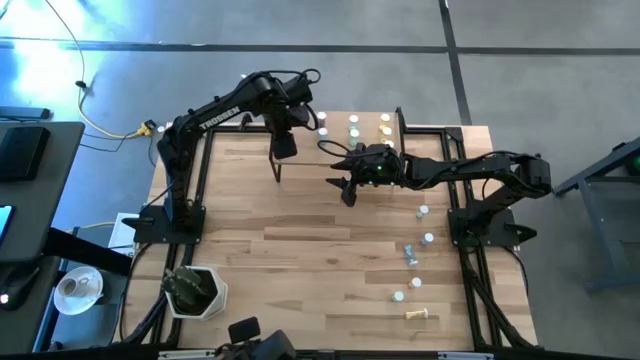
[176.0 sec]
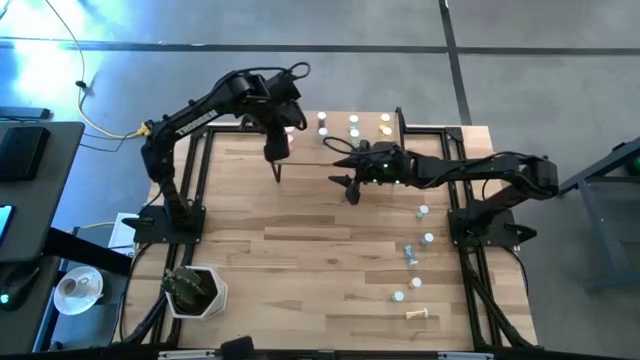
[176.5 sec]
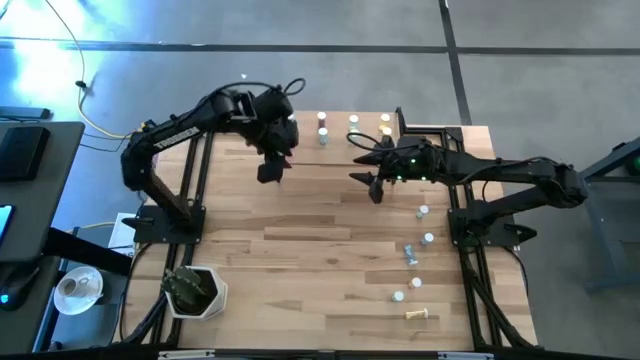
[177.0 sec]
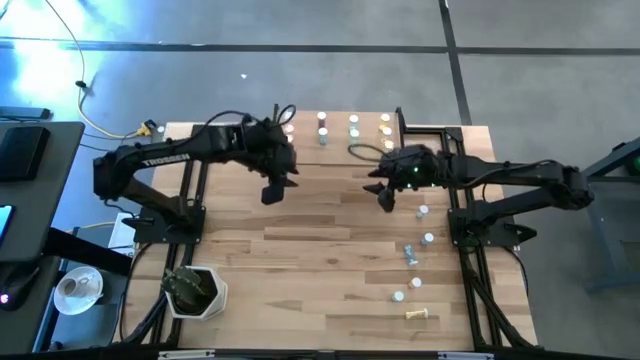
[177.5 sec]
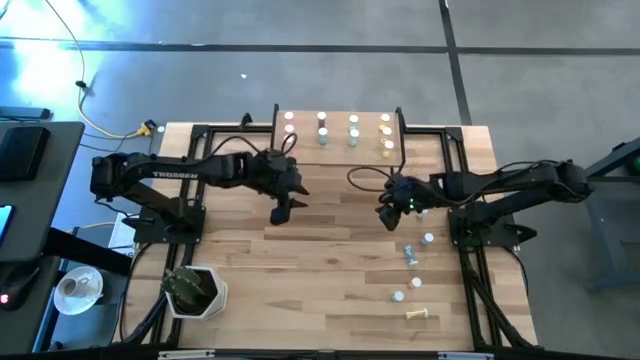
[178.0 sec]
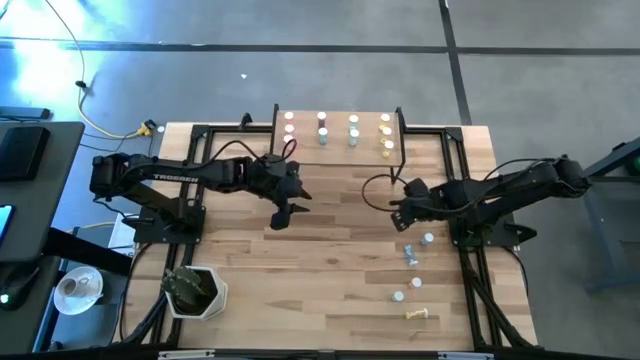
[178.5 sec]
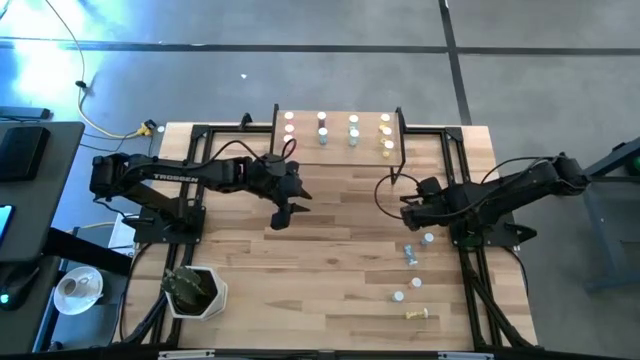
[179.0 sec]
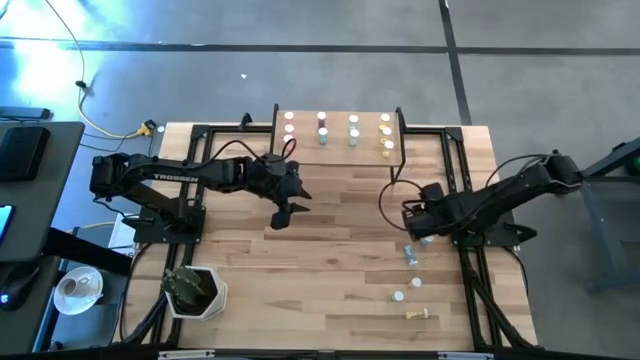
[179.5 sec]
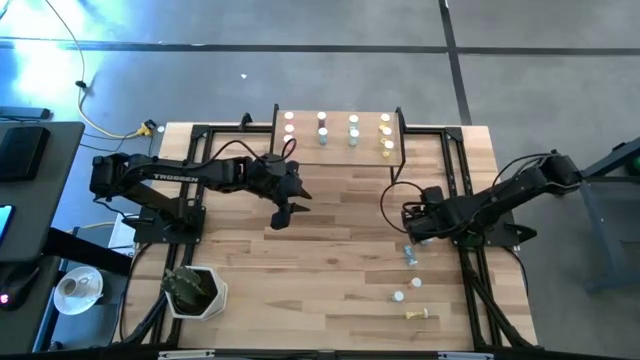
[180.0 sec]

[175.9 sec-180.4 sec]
Task: Pick and place medicine bottles onto shelf by color
Put the green pill bottle on the shelf aligned with the other green pill bottles

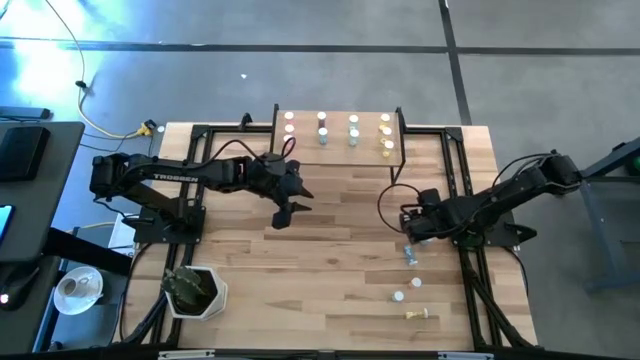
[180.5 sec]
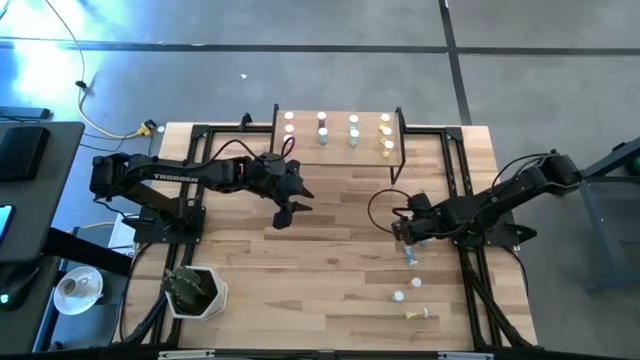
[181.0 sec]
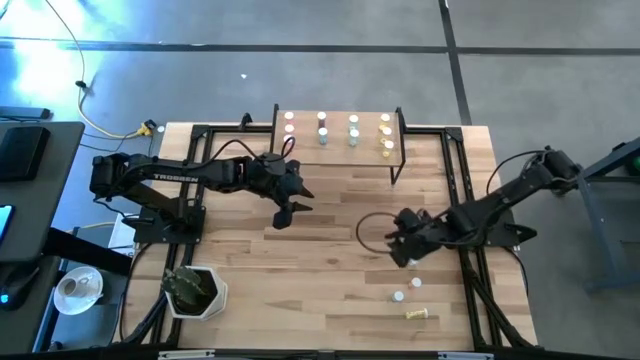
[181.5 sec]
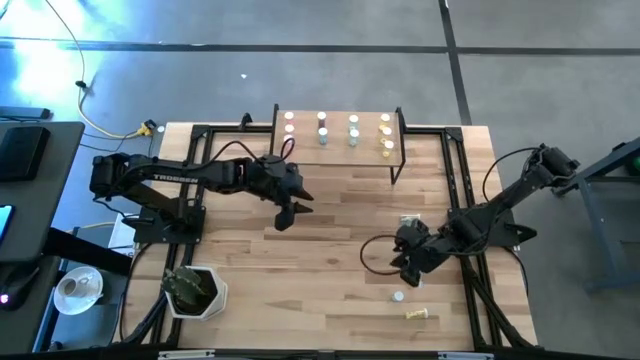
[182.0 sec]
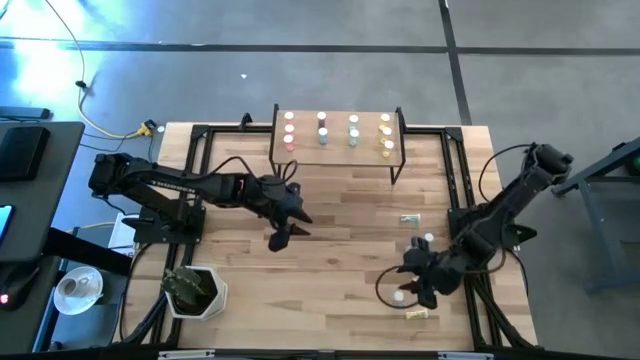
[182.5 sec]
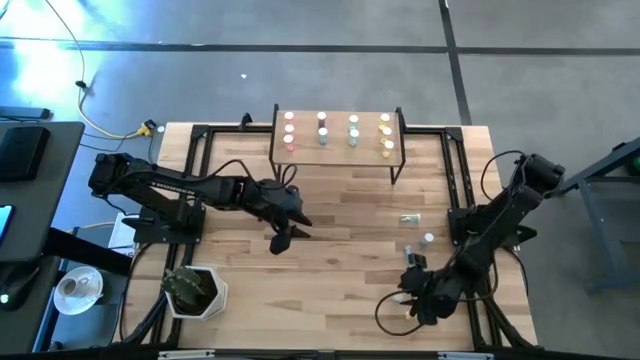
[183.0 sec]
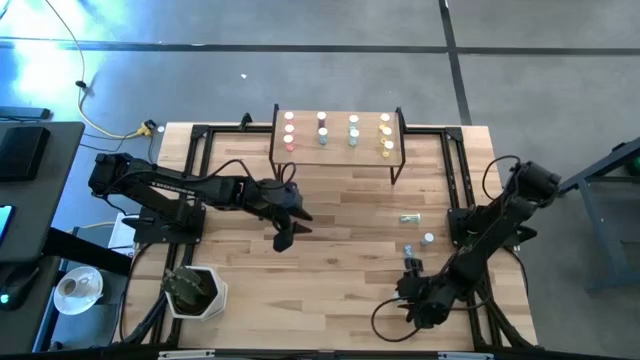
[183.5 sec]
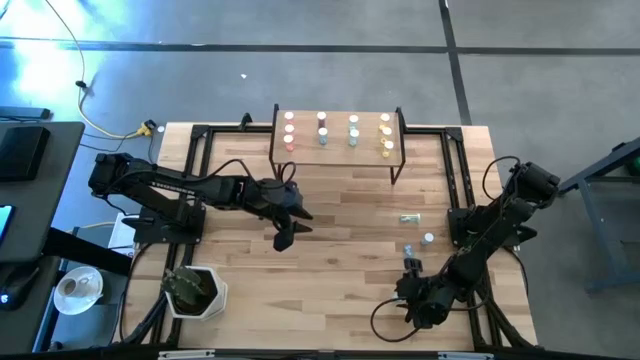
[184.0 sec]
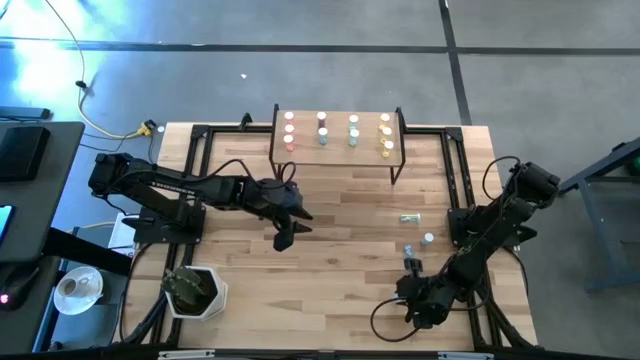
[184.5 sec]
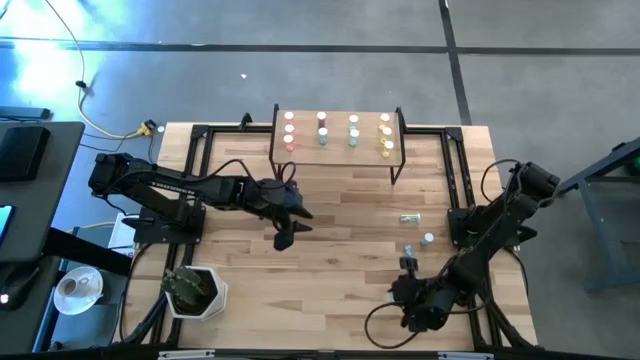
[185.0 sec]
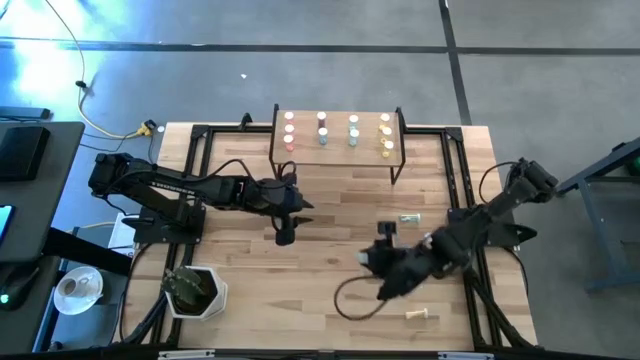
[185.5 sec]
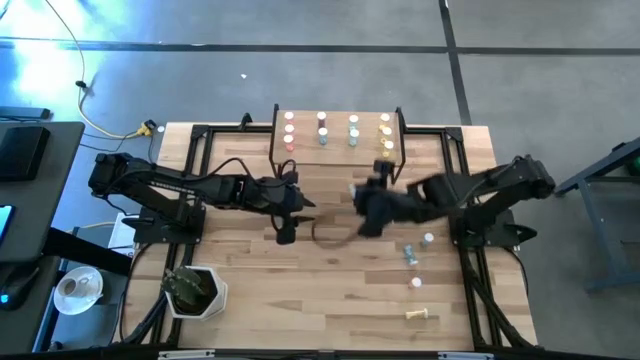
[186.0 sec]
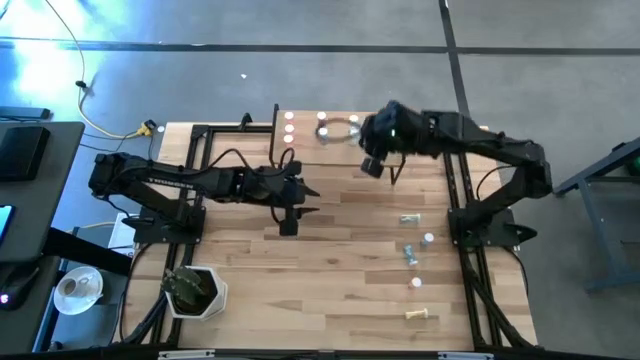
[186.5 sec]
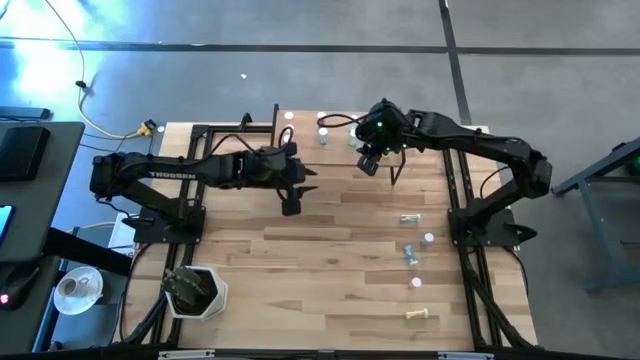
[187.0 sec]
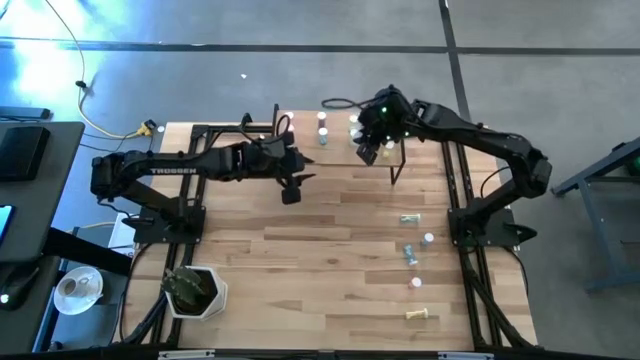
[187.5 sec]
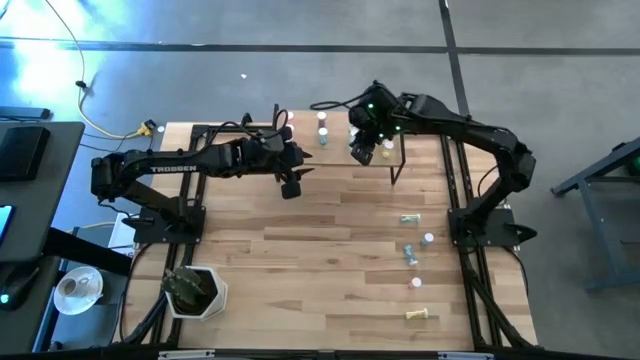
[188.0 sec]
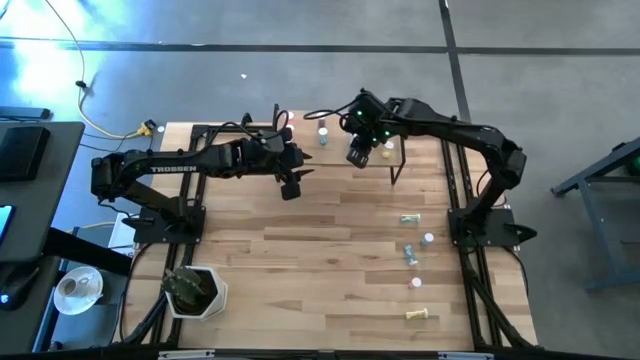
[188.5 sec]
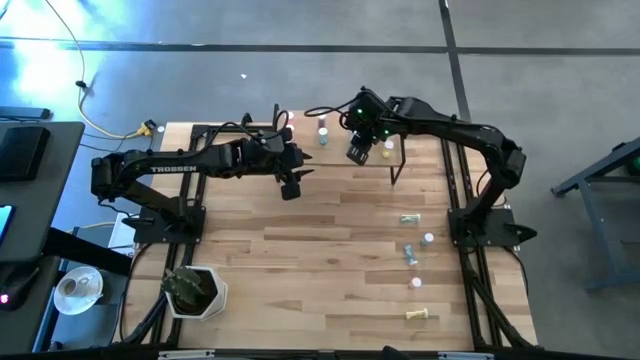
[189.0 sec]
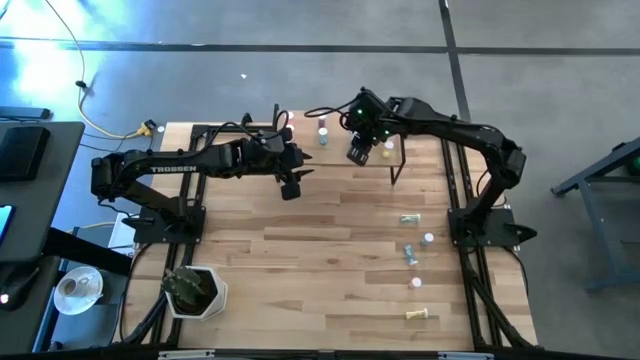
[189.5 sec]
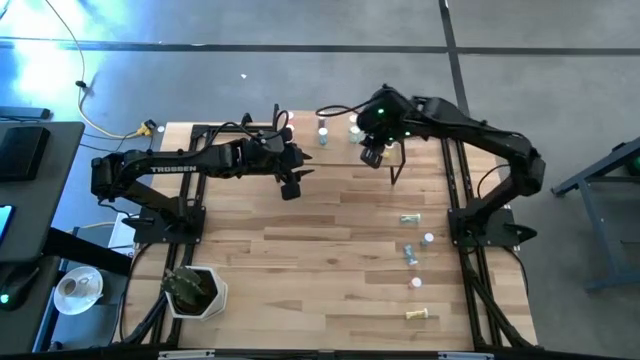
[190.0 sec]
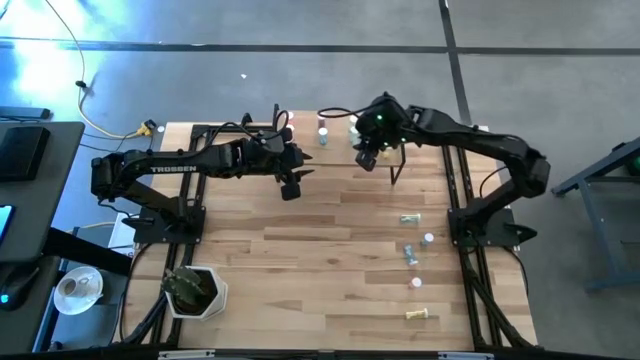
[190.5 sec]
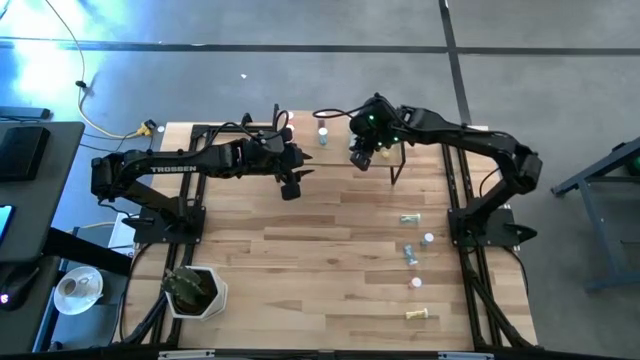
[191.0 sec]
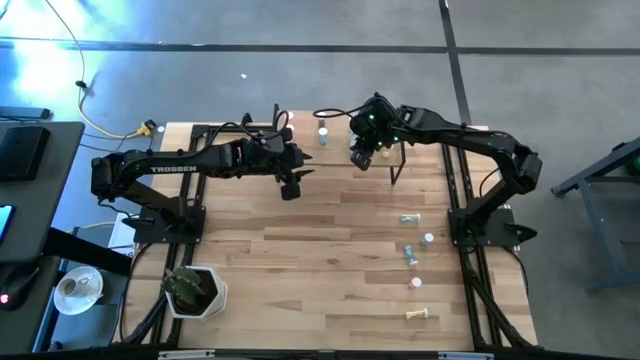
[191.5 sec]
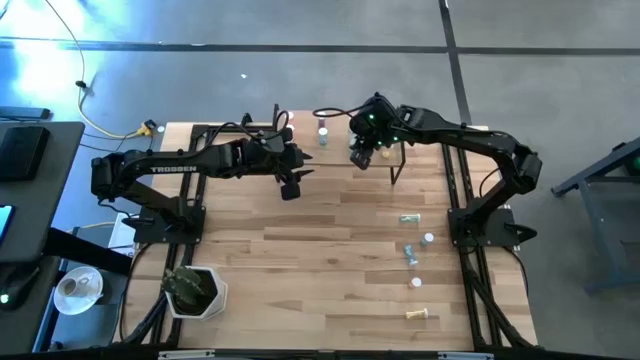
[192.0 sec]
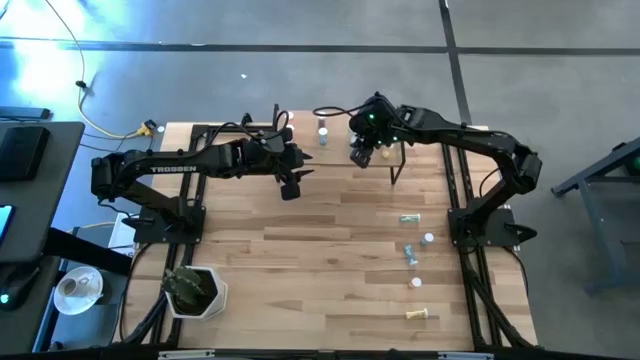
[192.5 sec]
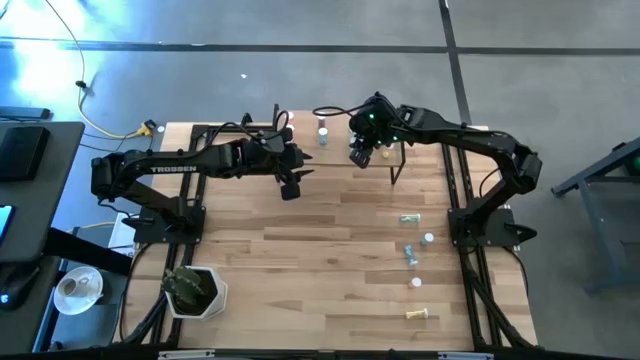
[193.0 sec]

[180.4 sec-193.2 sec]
Put the green pill bottle on the shelf aligned with the other green pill bottles

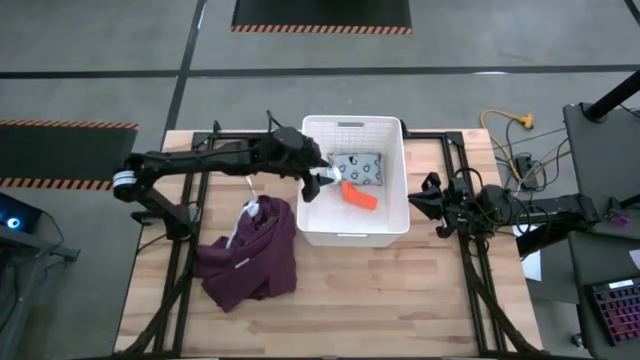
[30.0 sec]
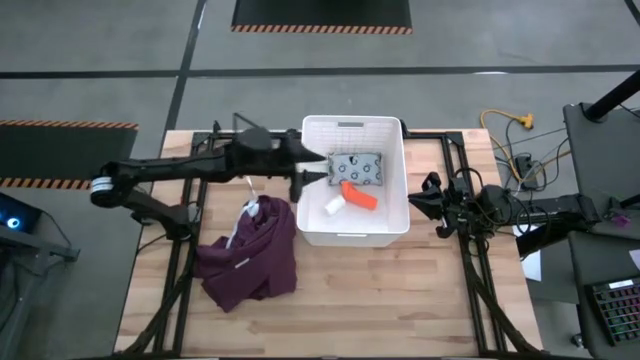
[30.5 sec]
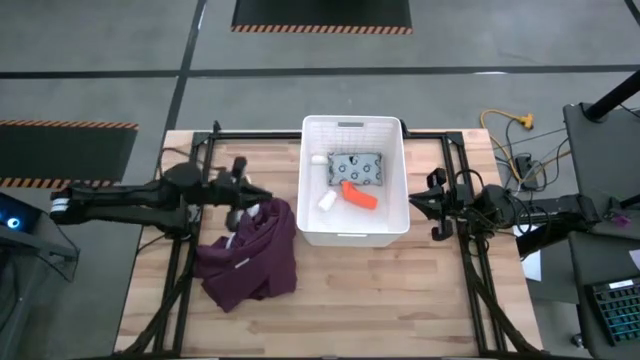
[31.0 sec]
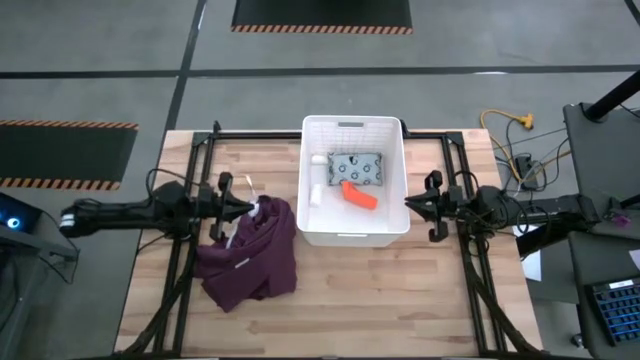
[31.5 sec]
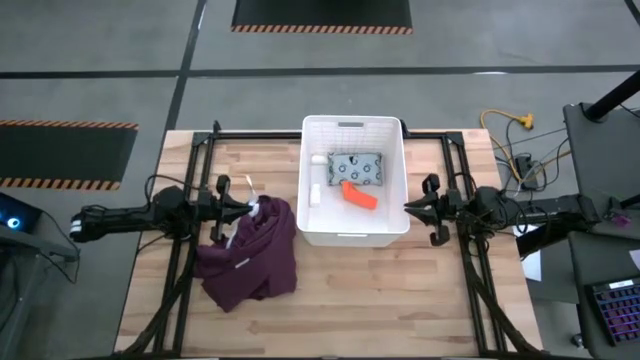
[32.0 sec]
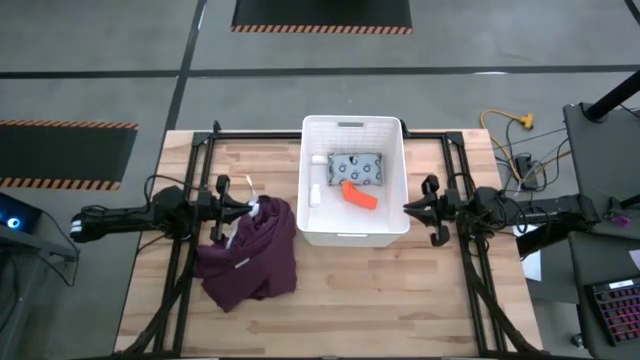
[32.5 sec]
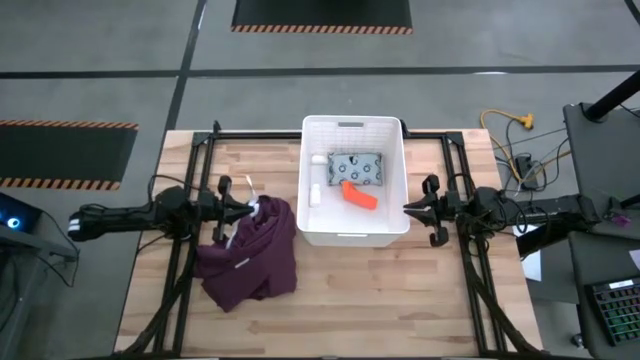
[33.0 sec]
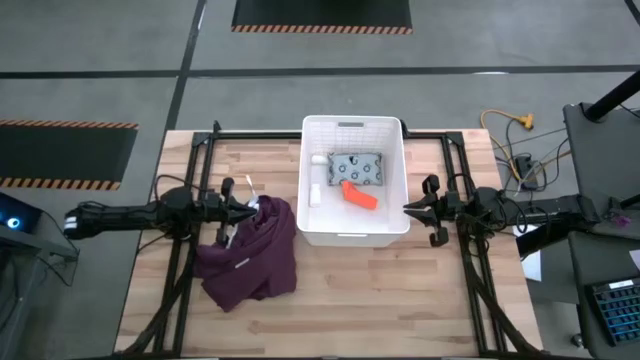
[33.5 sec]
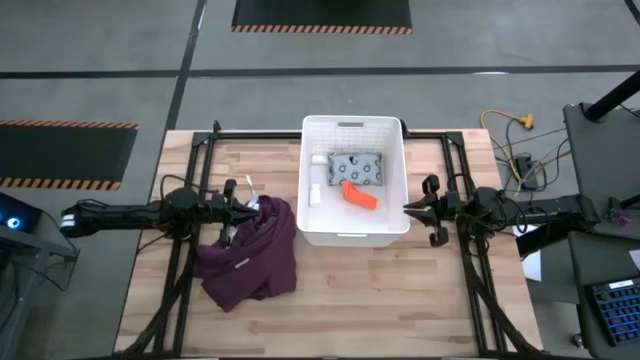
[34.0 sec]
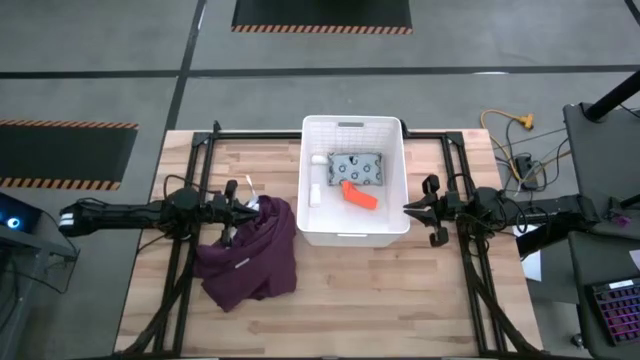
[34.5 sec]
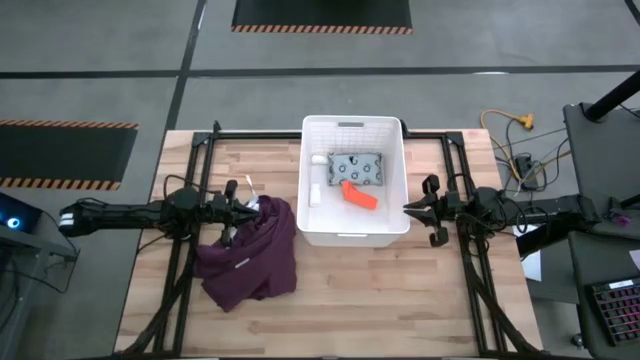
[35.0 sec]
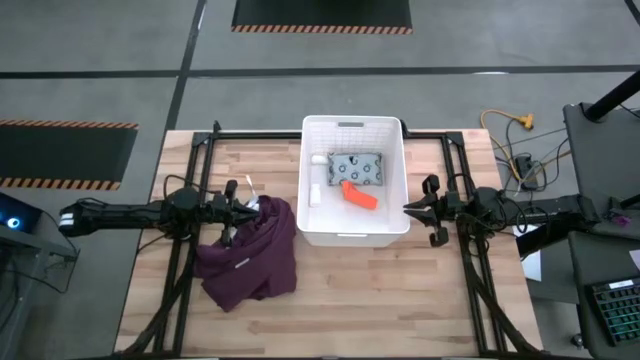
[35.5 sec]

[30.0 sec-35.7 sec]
Task: Pick & place medical supplies in basket/bin
Return to Home Position
